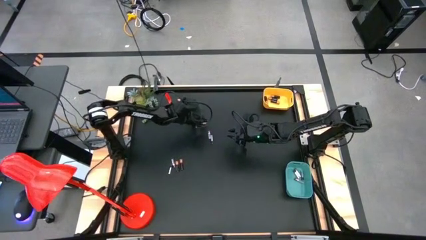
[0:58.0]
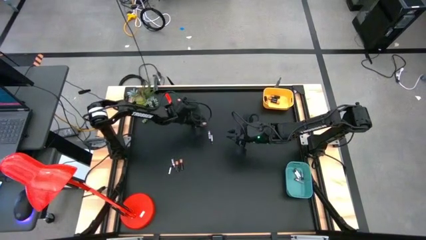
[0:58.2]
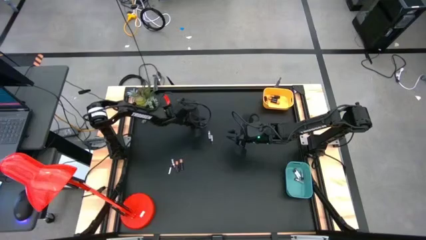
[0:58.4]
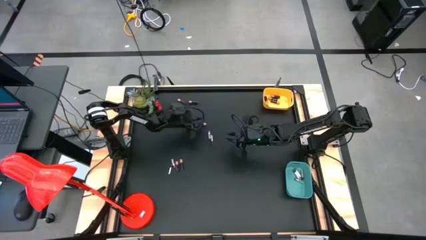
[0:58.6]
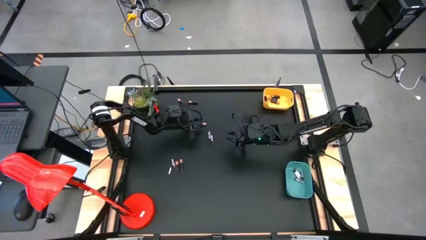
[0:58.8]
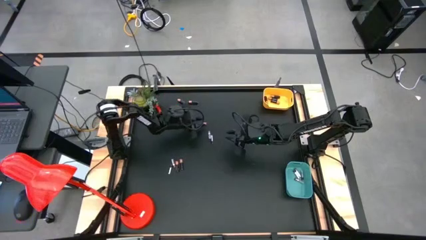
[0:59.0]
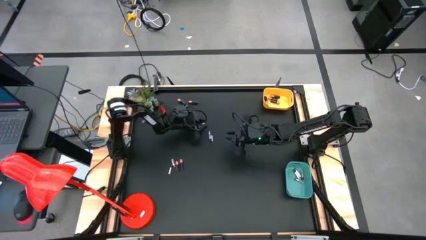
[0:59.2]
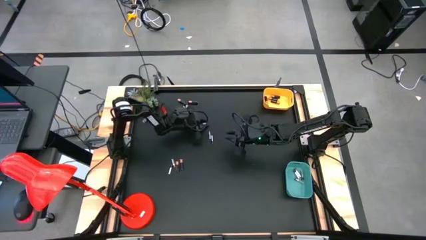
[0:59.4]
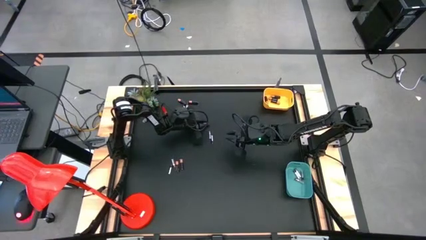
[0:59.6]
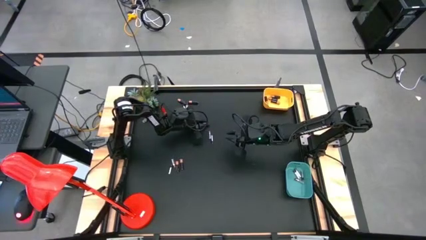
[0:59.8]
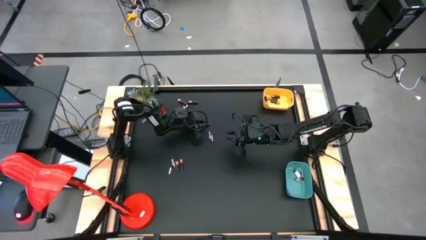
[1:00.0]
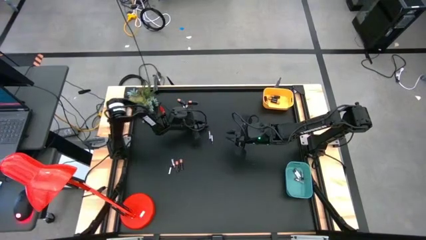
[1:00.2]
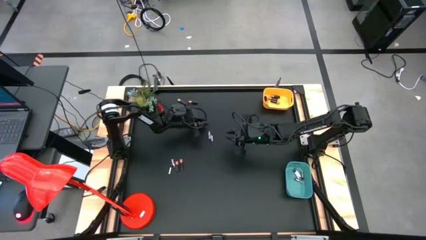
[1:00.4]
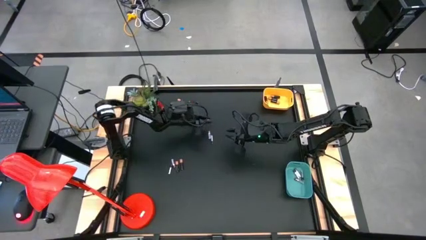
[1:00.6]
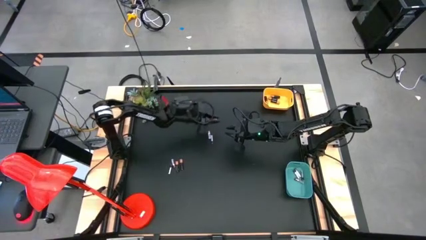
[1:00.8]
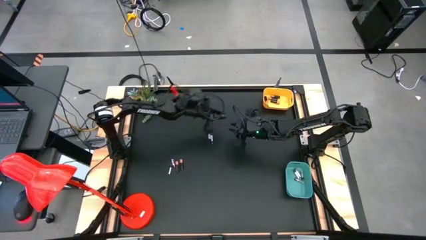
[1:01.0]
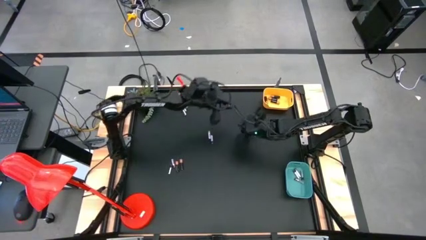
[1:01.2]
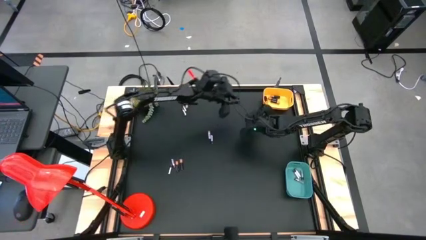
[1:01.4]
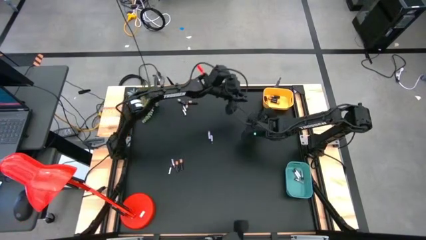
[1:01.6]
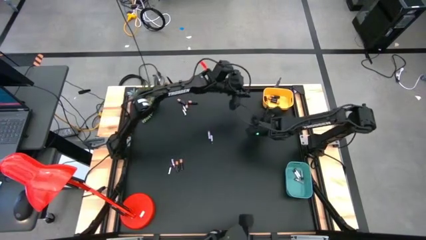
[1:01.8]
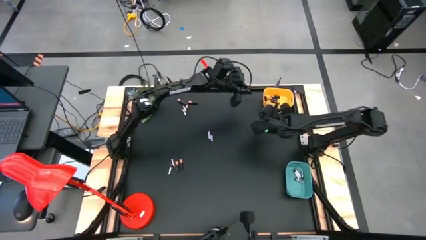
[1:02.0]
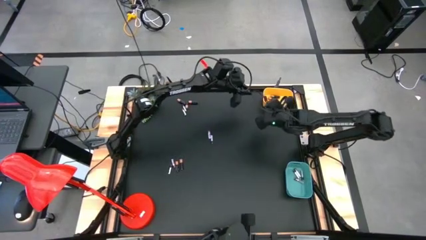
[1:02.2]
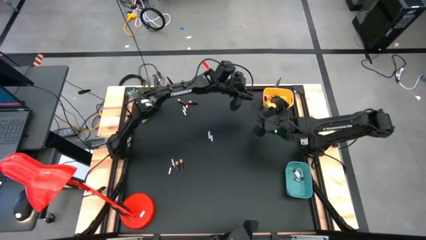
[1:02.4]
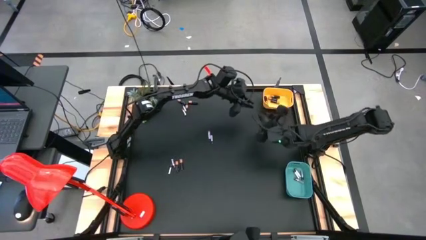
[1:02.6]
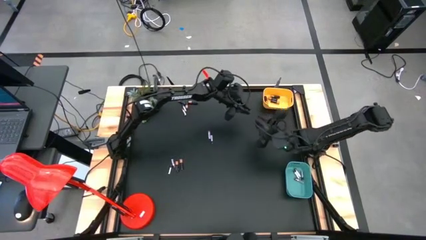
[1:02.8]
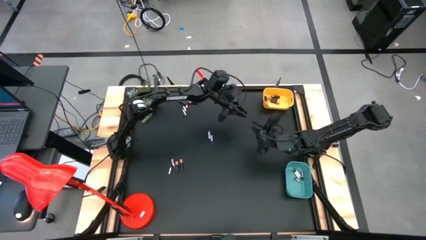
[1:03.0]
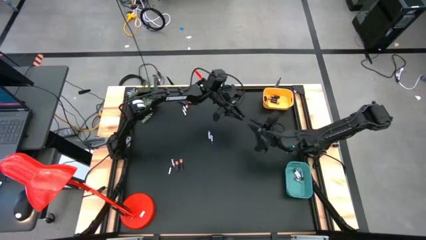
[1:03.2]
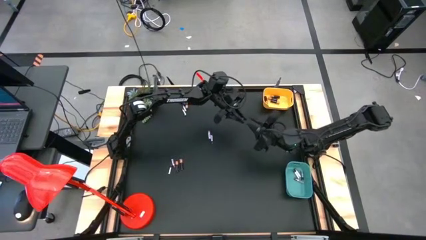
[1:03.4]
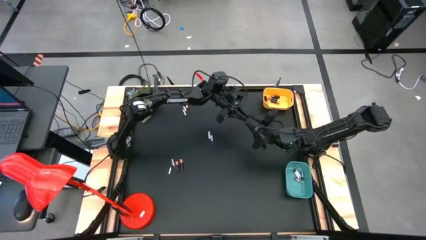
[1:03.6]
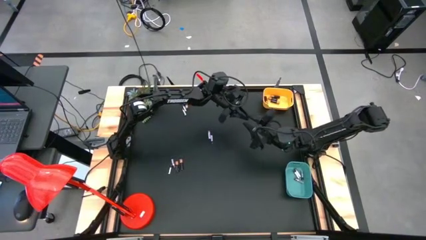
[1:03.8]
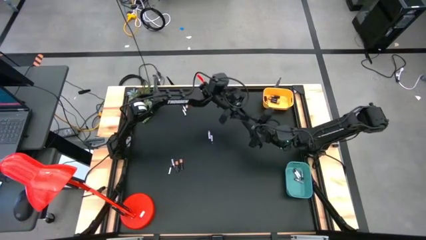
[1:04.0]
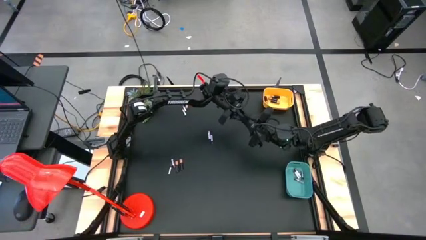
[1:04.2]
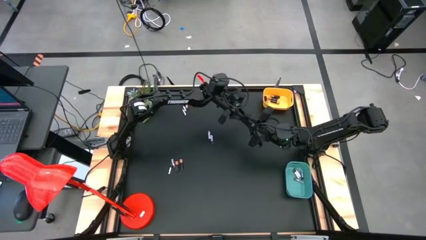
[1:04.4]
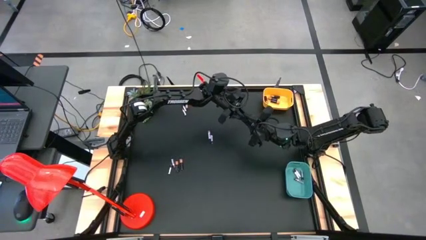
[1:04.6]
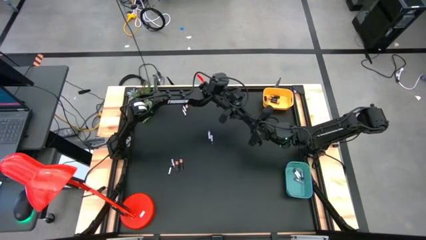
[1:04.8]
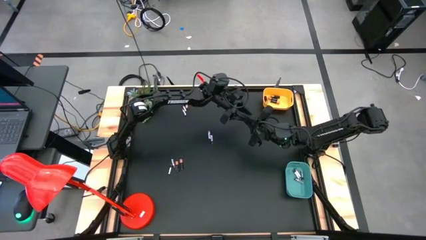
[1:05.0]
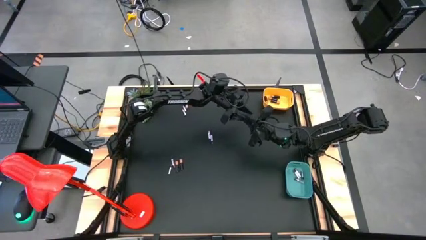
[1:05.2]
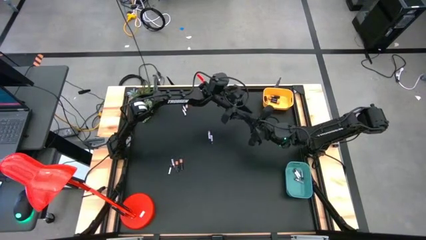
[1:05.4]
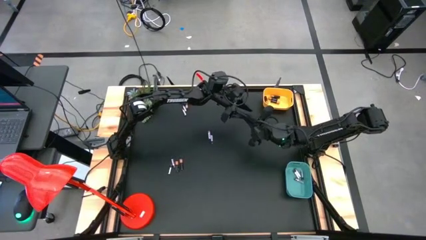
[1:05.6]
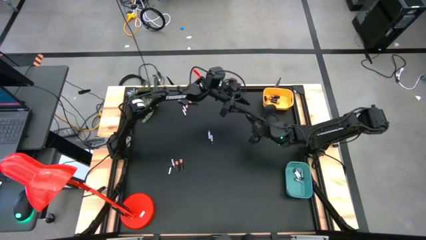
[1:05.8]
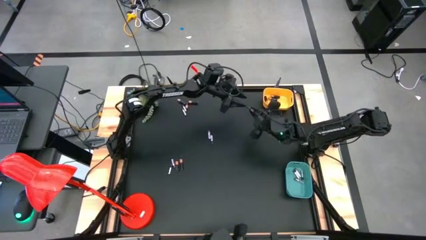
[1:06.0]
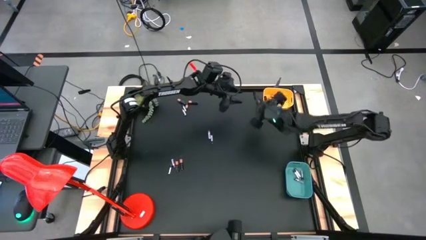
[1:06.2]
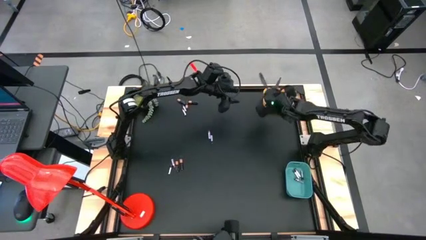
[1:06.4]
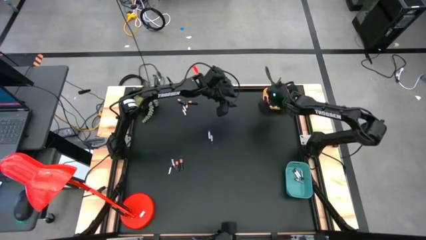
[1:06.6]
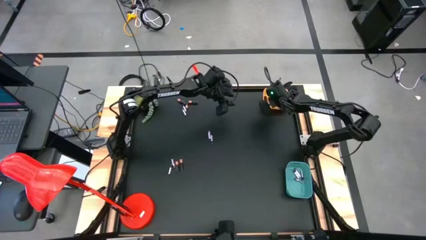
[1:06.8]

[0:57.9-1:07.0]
Task: Sort batteries
Put the black battery into the yellow bin

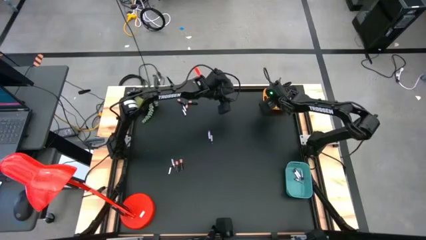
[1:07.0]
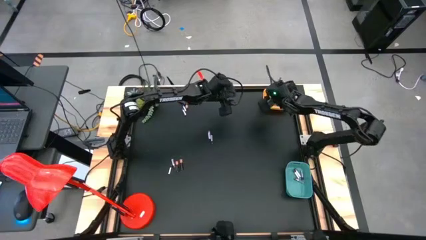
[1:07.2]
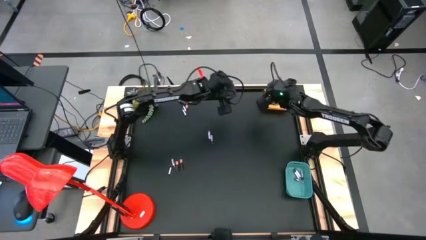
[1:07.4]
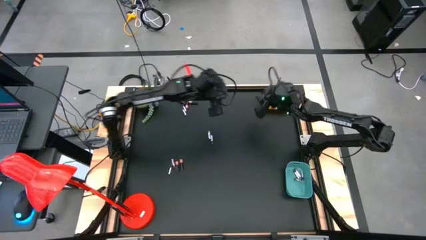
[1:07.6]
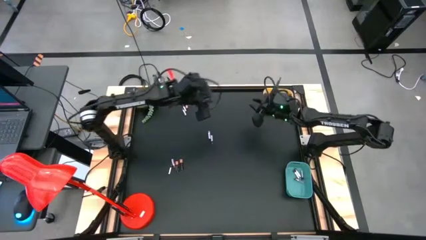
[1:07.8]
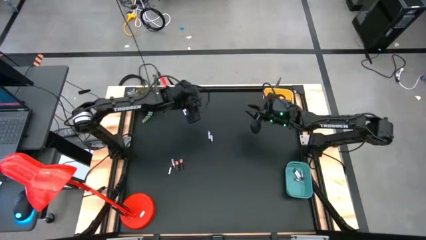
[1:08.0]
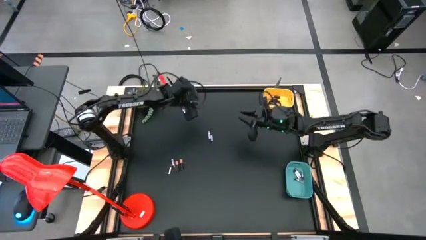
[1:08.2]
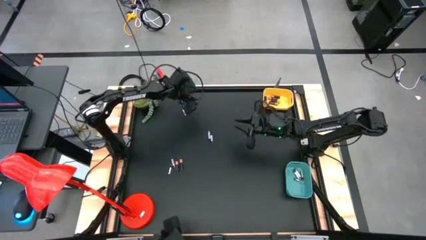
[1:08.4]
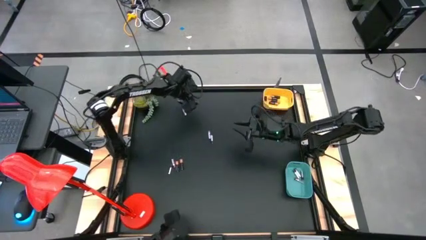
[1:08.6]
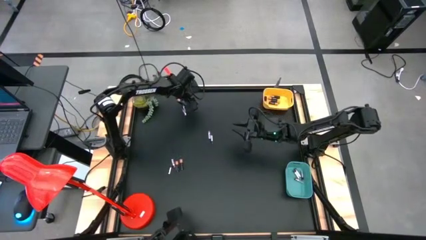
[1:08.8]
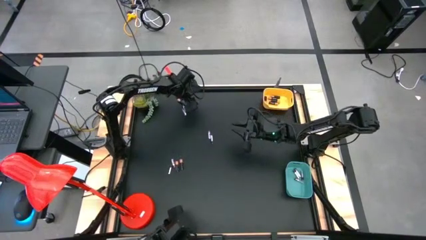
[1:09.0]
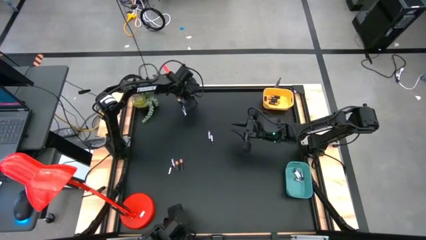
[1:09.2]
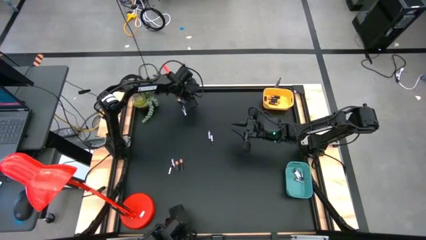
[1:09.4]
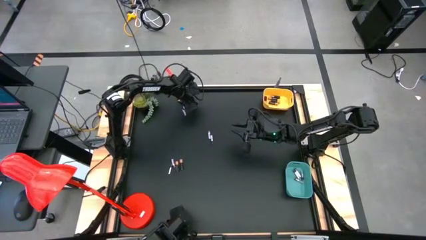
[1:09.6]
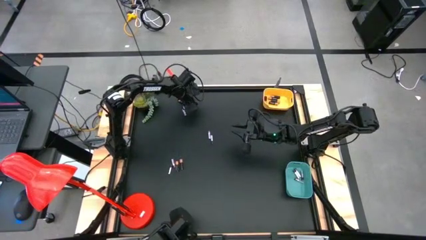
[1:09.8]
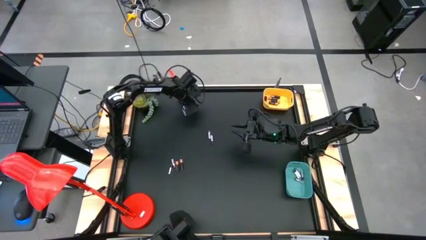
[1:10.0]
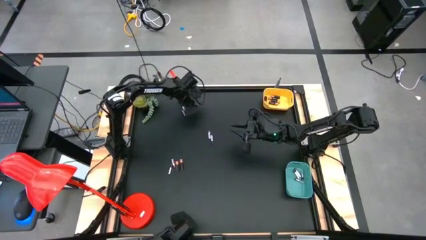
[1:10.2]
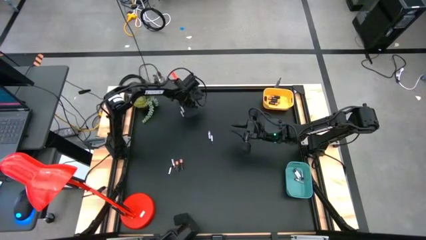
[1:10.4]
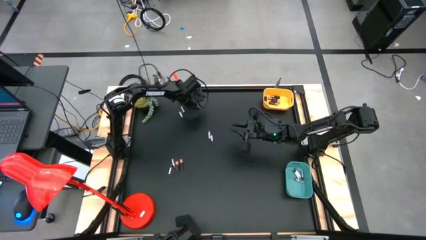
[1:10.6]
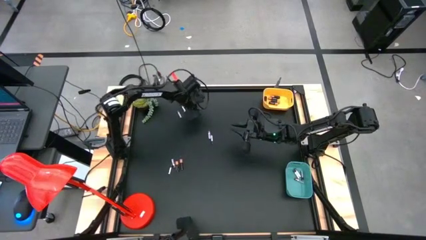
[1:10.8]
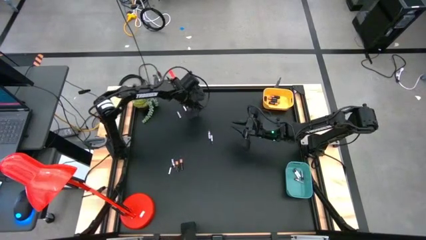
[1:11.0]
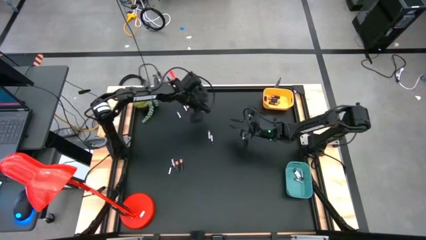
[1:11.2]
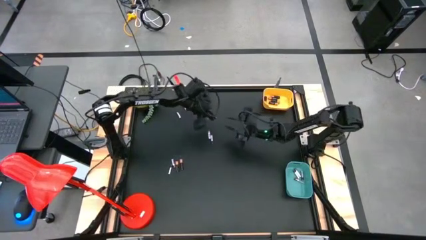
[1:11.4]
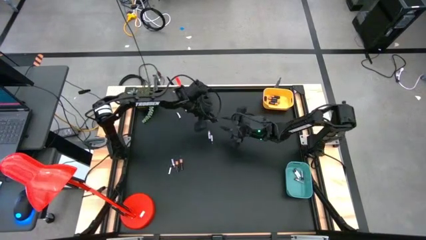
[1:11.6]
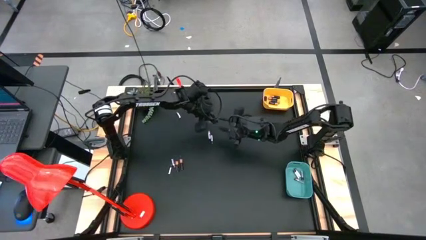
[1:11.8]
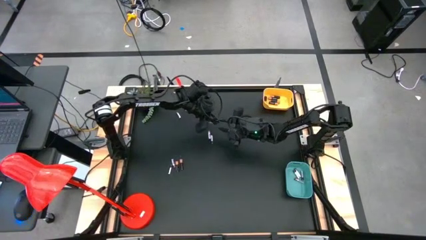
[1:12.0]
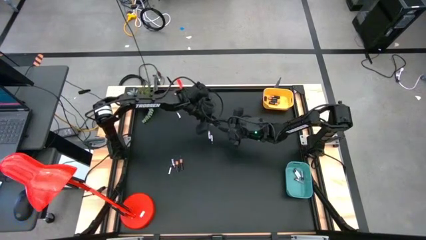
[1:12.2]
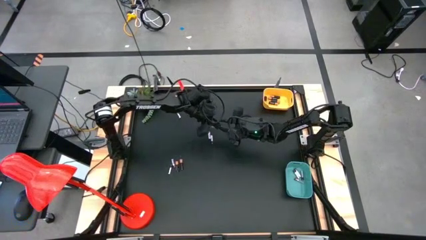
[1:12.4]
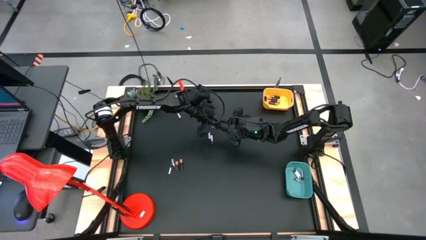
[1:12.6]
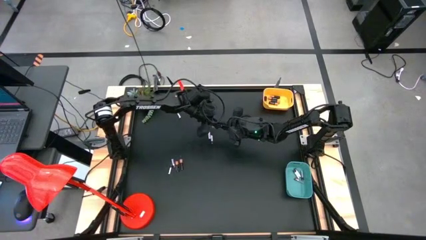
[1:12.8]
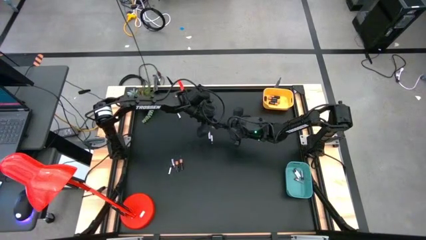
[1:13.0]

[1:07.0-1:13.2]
Put the black battery into the yellow bin

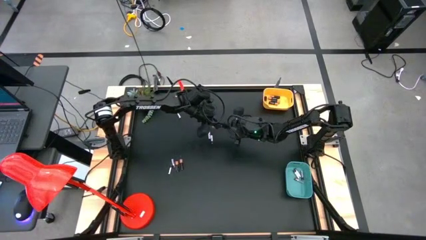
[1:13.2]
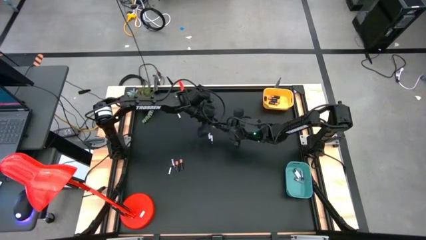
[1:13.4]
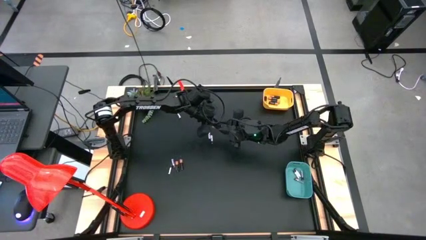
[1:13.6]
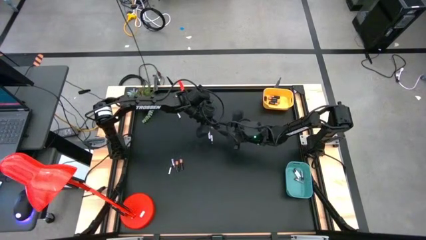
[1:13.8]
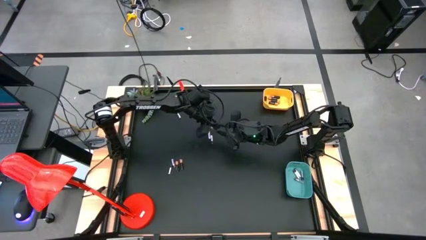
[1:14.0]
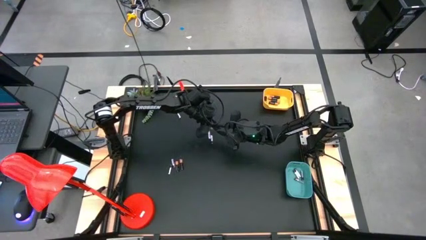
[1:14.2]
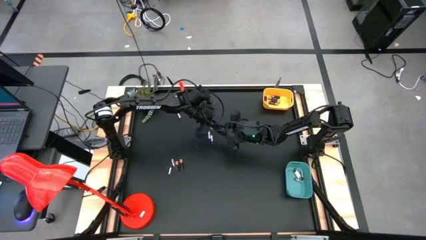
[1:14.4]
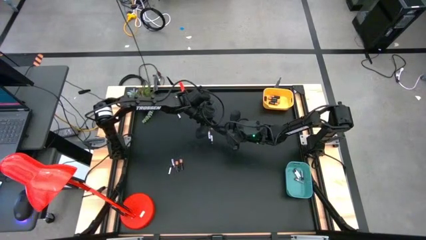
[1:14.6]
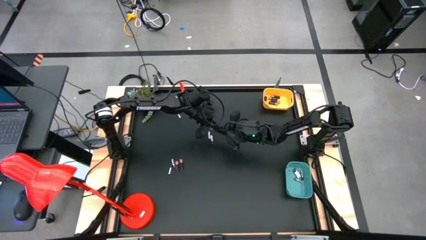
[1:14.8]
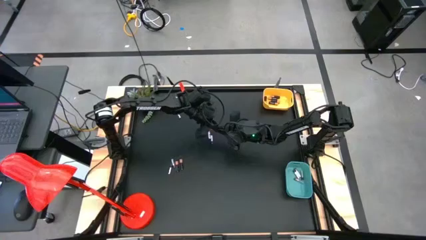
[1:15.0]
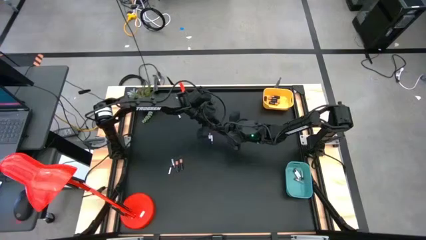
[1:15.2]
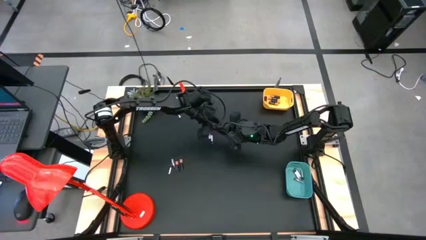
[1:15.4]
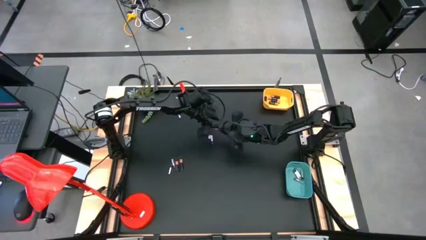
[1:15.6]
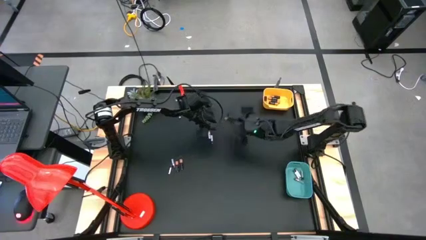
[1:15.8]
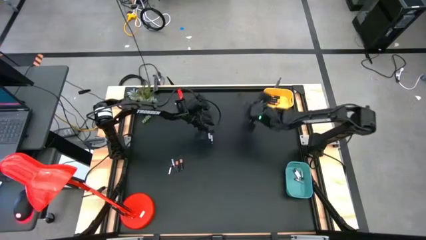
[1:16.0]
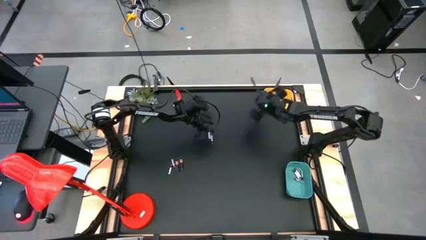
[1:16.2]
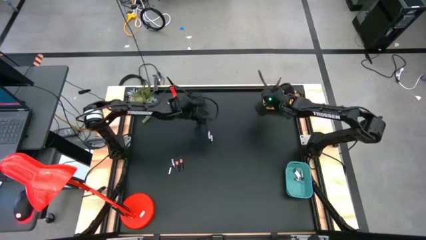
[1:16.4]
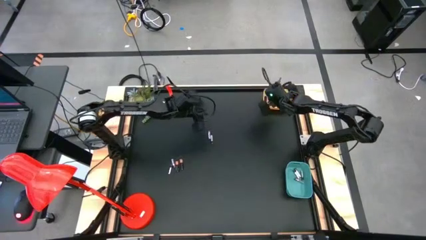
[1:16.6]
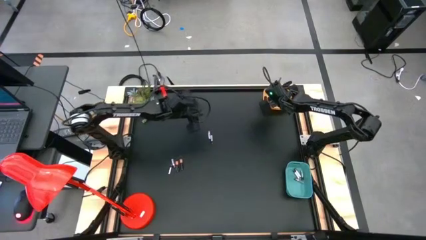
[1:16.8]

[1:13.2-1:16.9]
Put the black battery into the yellow bin
